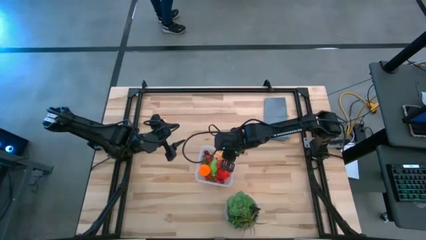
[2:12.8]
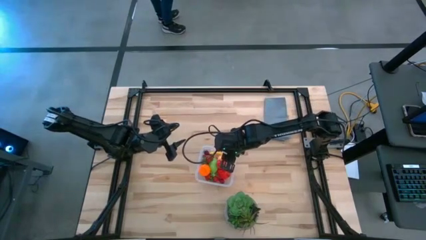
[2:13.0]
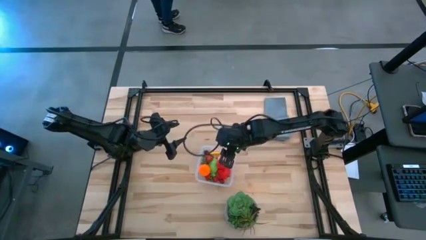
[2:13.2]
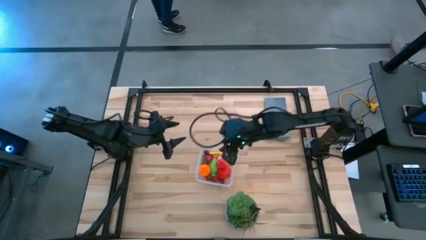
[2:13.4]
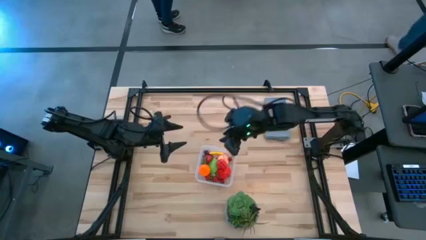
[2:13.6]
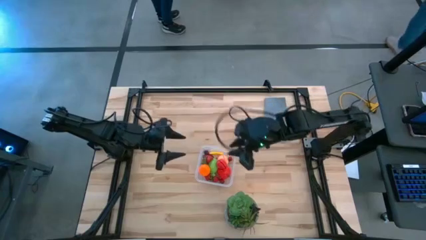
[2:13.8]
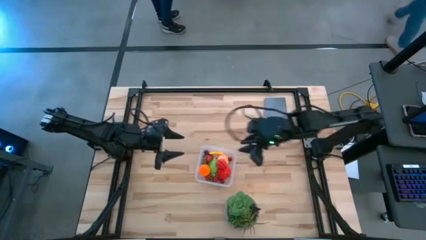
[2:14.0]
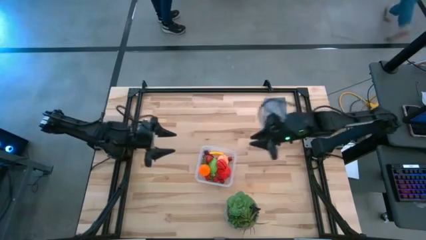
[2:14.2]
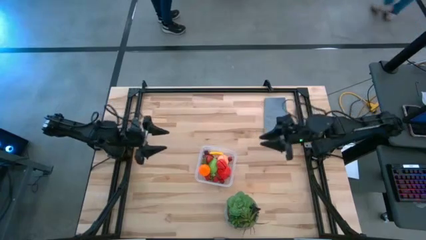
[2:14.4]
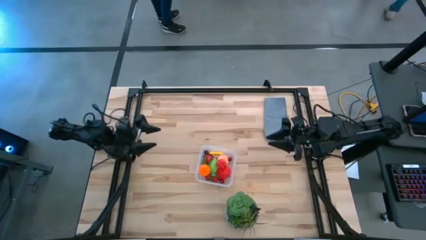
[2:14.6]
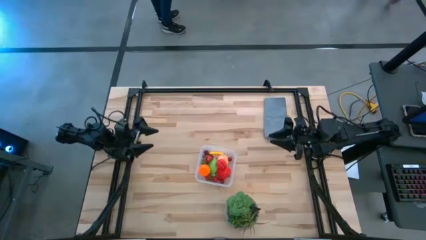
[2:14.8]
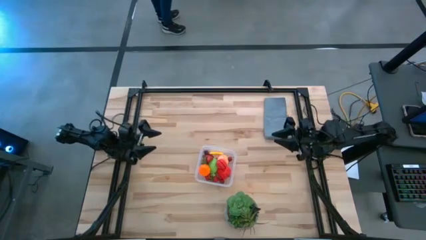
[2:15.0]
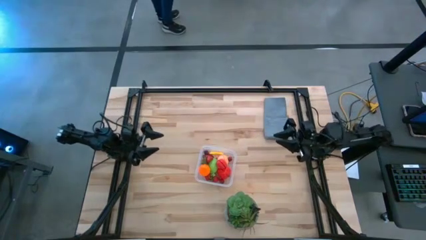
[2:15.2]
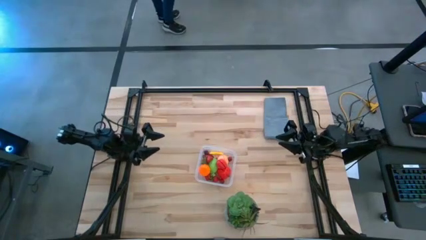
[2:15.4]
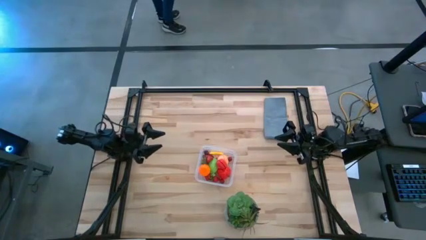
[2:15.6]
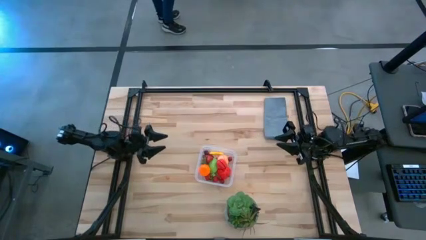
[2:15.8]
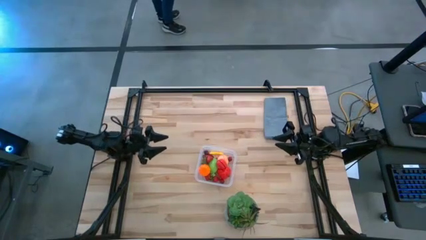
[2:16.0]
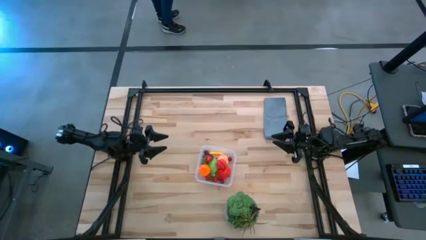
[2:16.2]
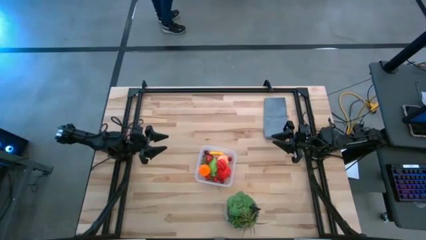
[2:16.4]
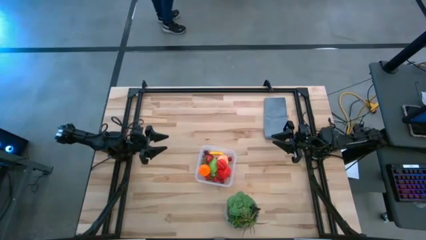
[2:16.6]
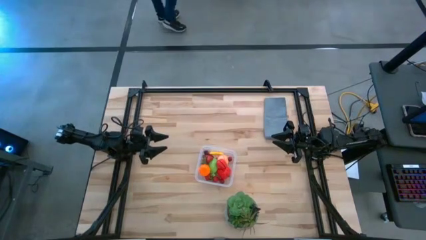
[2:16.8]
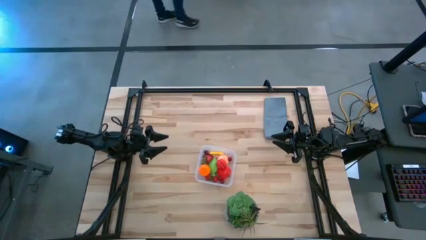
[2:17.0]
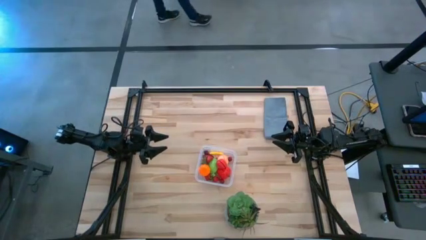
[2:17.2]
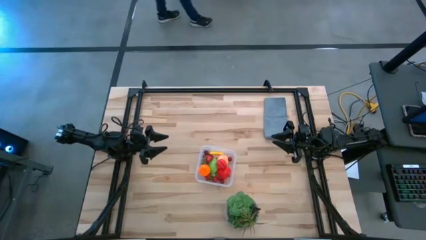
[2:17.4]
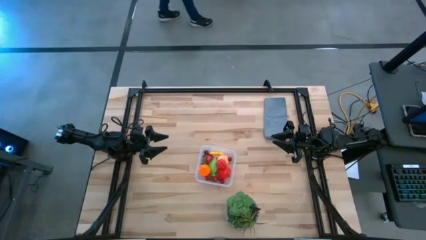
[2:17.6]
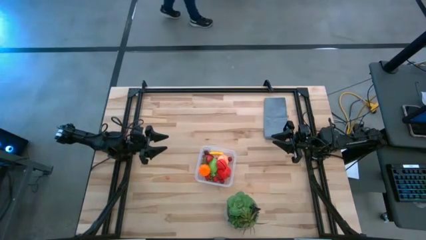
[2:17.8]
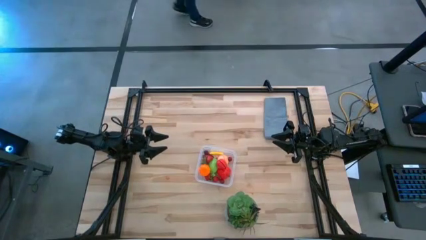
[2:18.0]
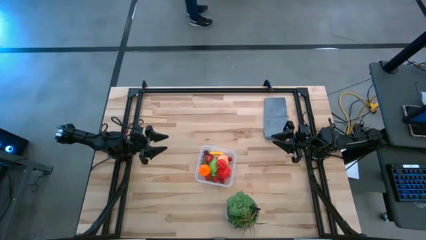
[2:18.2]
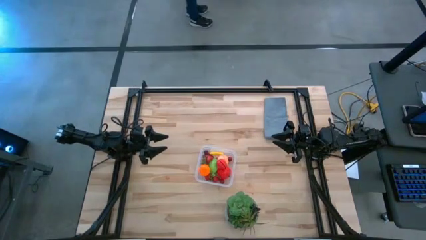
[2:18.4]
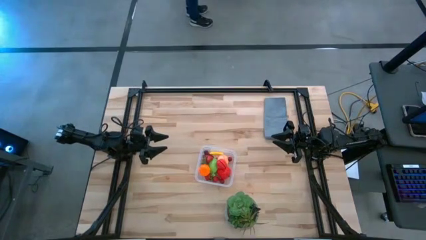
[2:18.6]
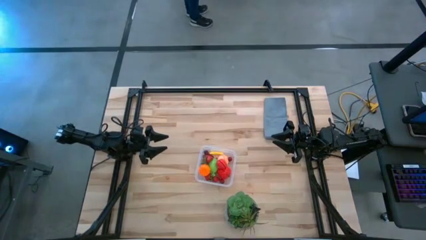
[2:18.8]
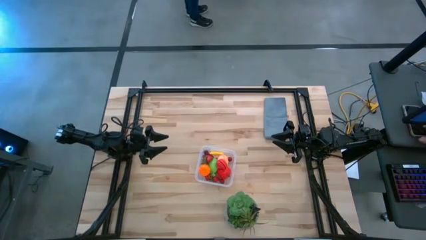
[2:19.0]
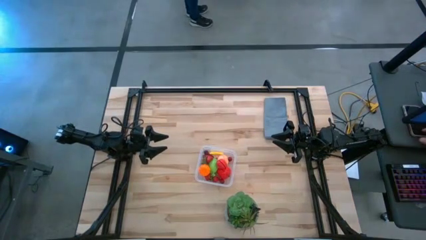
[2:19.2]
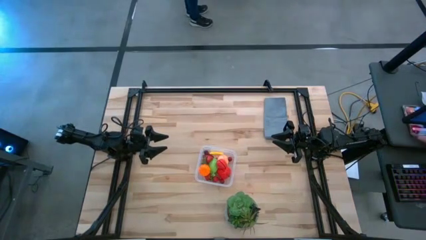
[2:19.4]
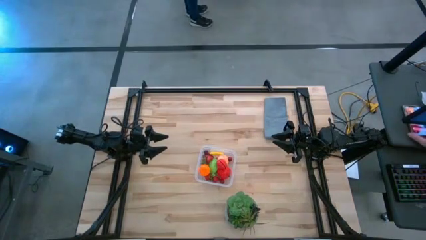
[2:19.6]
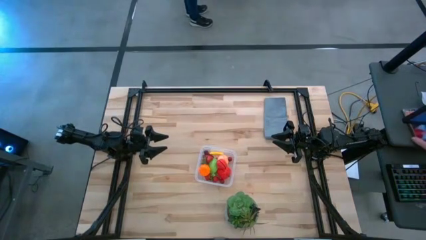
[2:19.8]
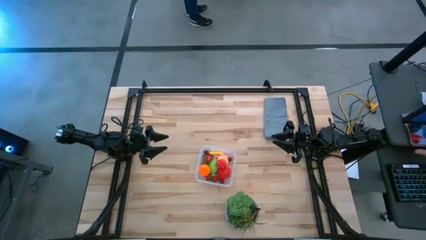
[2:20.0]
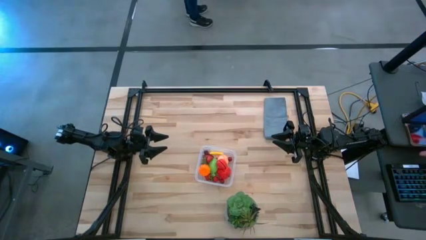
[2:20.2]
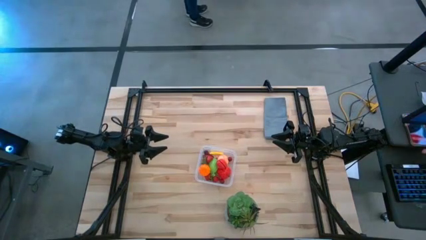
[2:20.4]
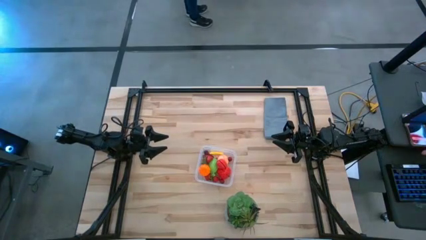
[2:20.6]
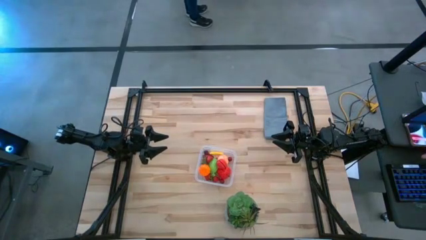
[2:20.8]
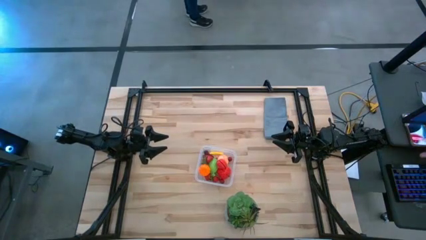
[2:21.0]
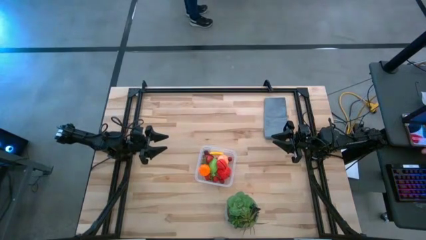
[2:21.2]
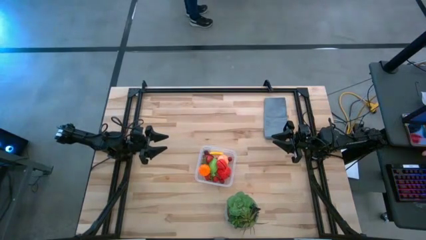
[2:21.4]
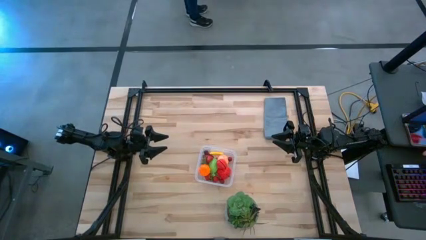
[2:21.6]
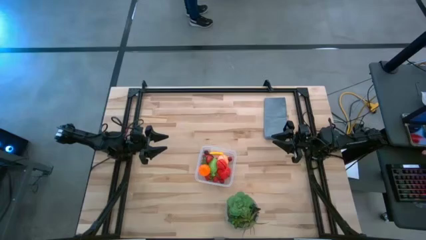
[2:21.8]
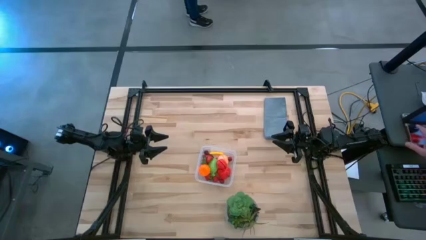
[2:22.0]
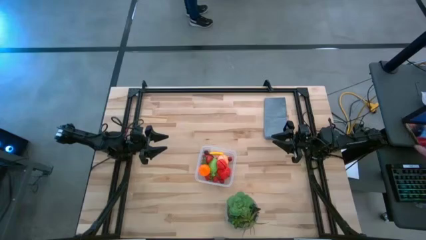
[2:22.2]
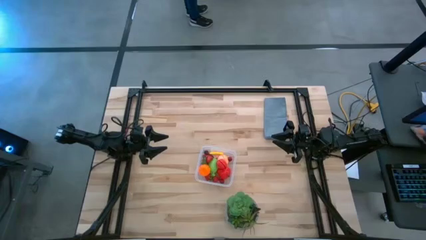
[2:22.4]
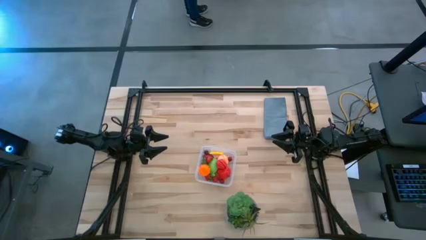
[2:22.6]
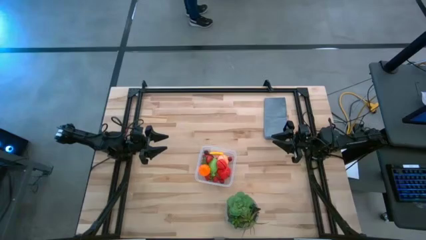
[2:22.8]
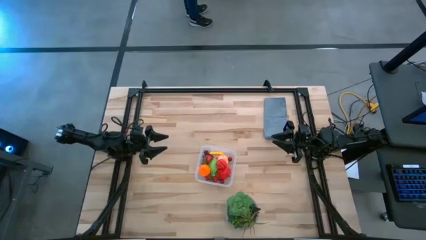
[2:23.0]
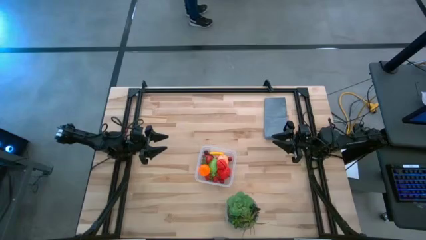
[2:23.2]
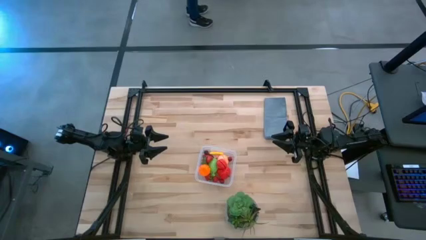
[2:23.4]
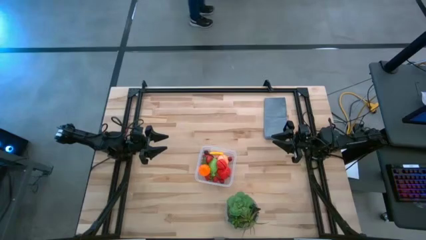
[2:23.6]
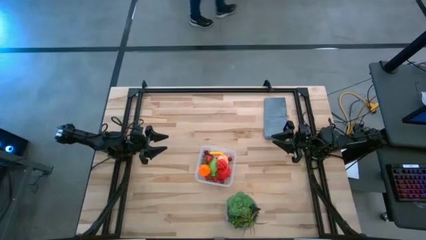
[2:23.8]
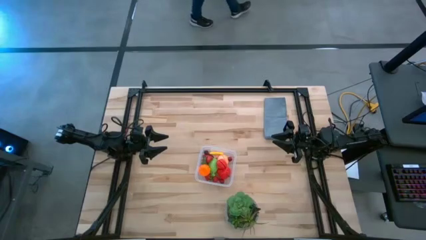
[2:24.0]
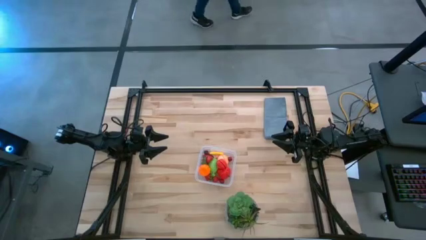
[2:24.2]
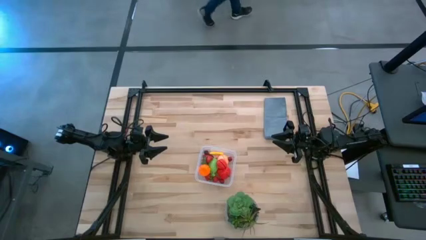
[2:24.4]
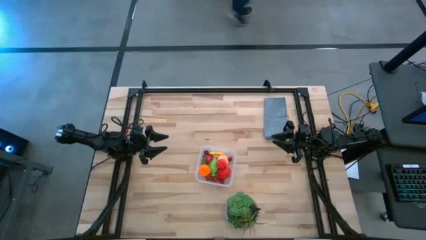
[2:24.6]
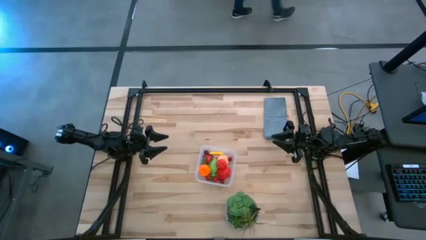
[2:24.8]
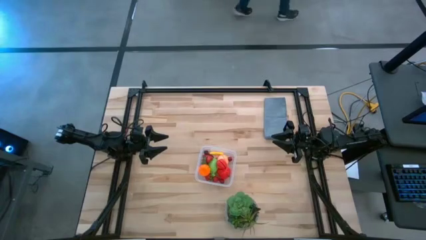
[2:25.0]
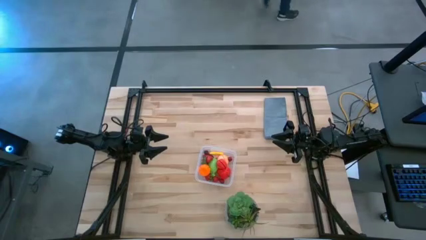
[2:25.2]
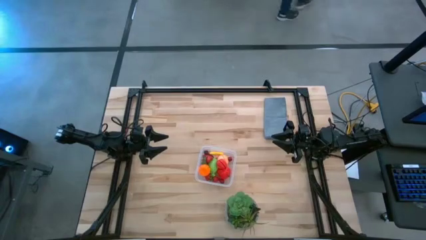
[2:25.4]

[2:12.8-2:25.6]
Task: Pick and placing Produce into tupperware
Return to Home Position

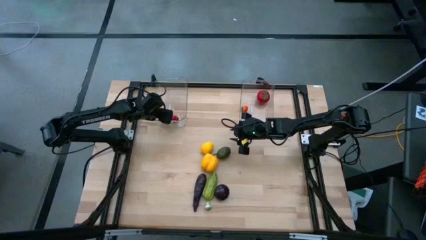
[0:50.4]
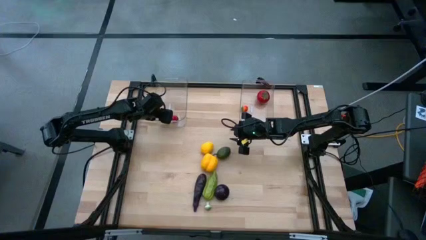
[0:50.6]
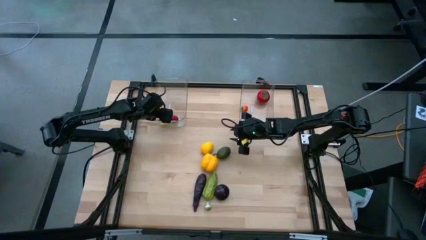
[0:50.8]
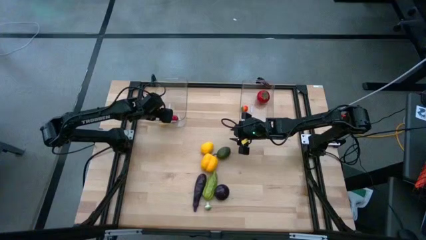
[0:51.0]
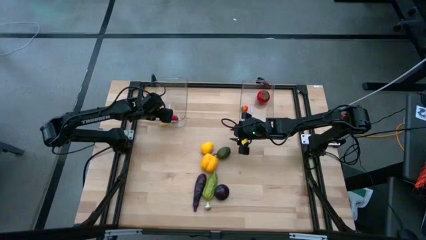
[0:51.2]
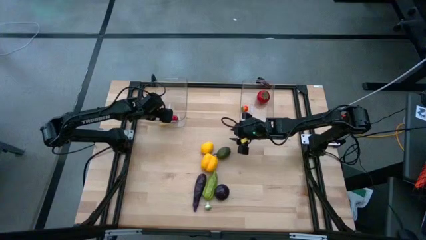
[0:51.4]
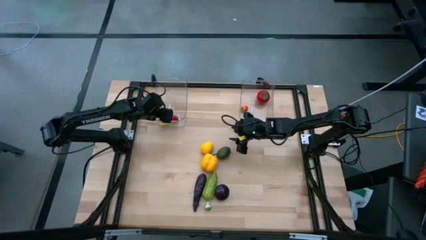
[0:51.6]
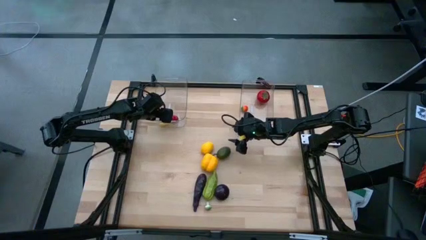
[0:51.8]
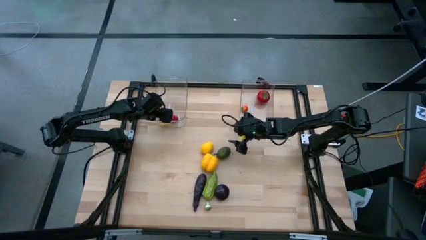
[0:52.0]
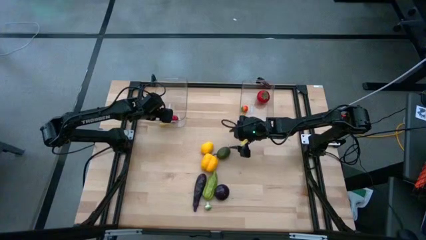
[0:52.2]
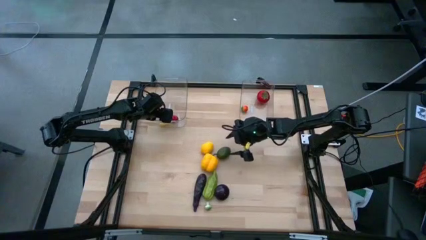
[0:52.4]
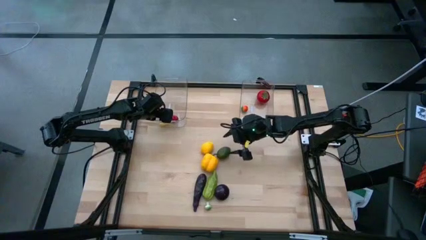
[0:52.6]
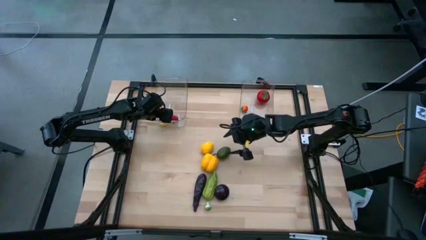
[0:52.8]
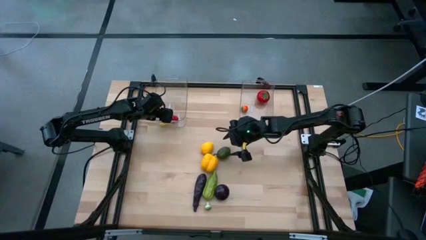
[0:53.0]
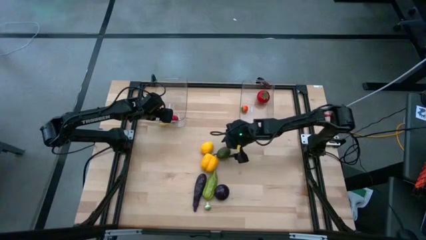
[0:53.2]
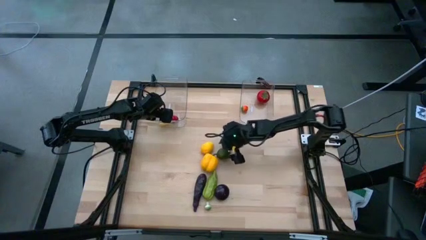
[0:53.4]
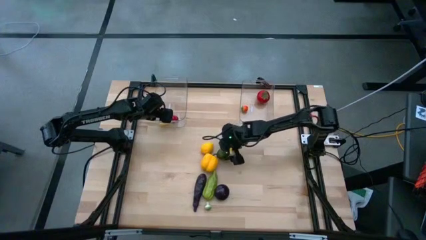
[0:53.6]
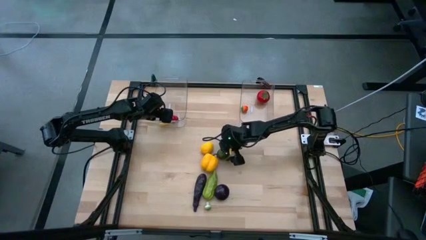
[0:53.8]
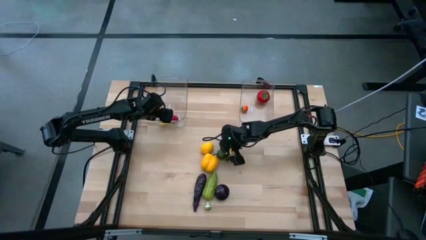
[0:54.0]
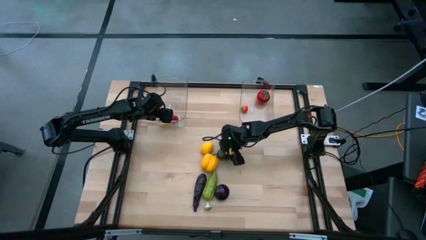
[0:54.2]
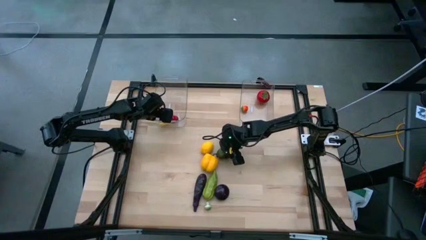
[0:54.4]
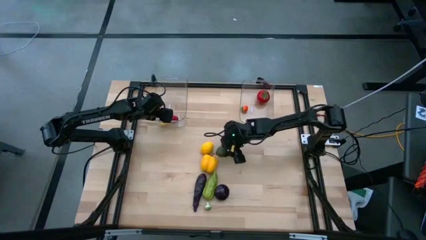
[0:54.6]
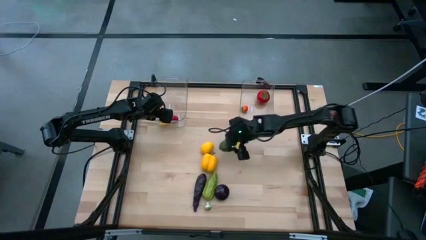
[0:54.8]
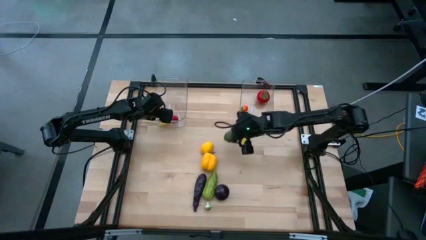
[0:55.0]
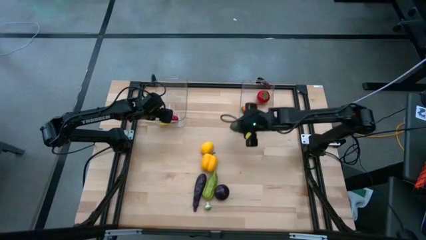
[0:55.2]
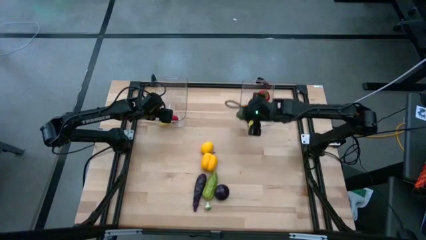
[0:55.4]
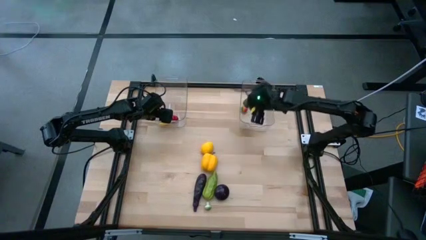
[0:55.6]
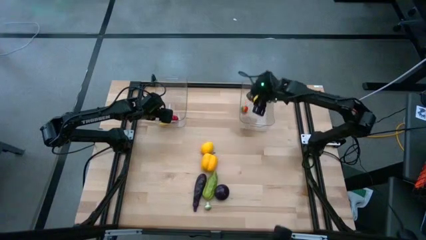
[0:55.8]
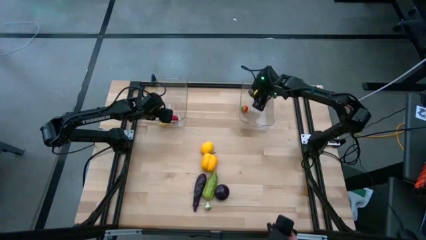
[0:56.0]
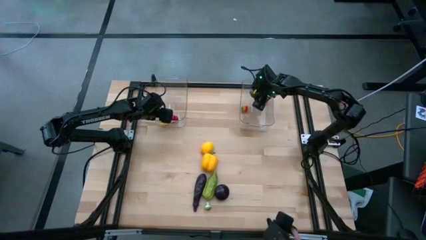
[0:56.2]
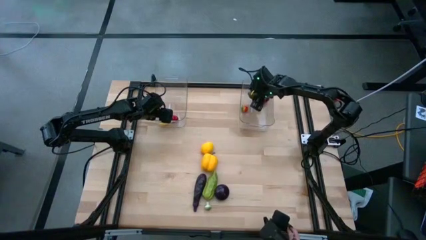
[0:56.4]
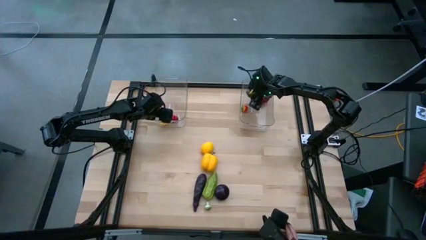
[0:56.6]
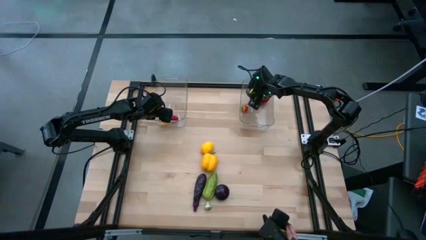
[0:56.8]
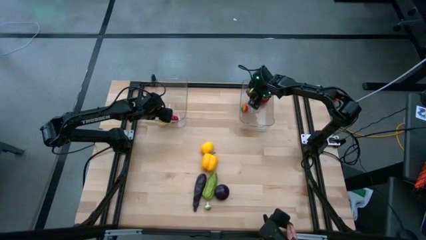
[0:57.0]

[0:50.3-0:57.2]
Task: Sort produce into baskets
Put the green lime into the right transparent bin
